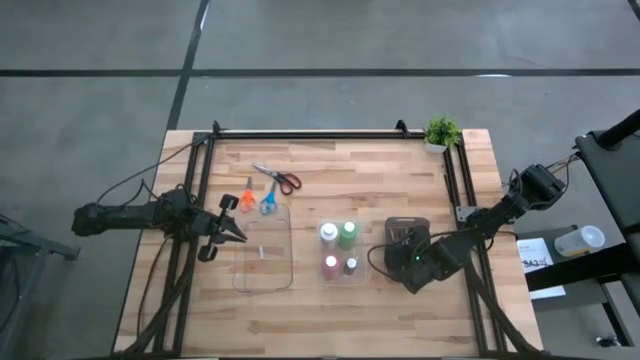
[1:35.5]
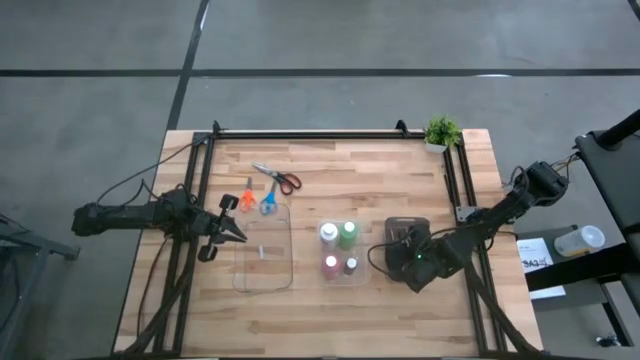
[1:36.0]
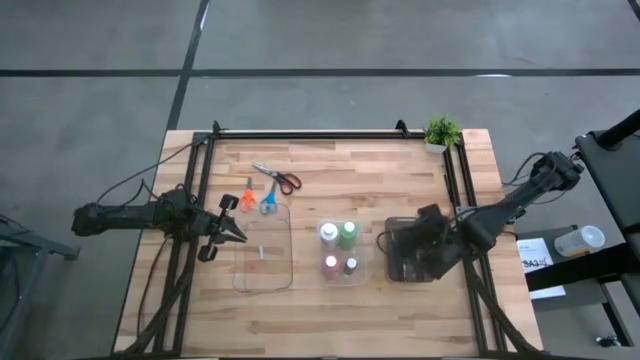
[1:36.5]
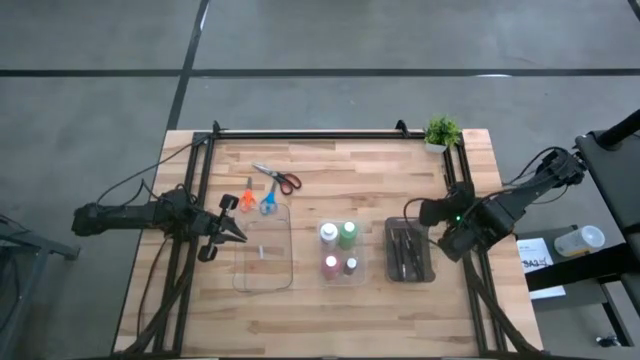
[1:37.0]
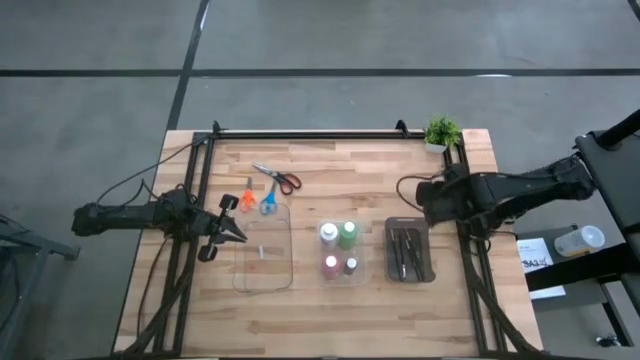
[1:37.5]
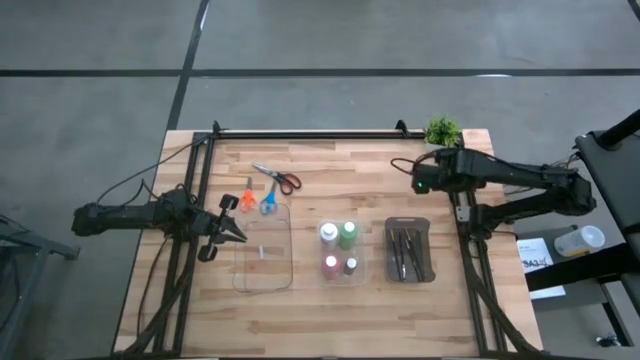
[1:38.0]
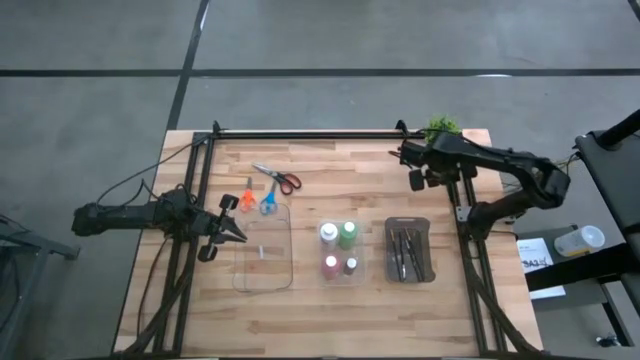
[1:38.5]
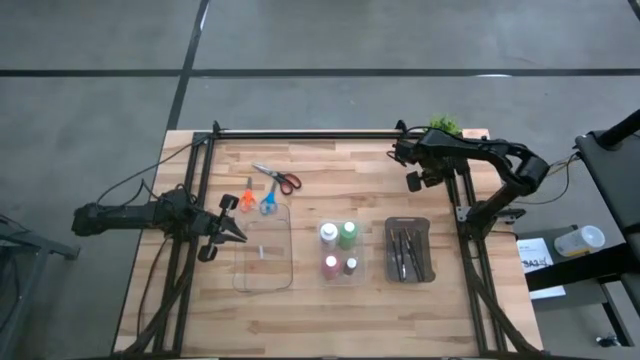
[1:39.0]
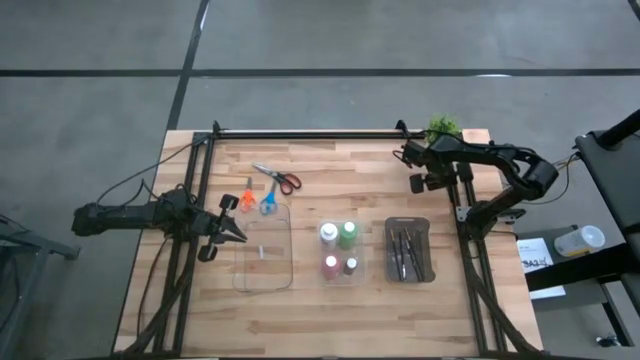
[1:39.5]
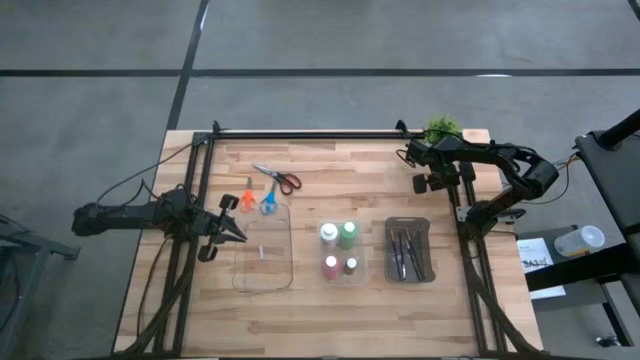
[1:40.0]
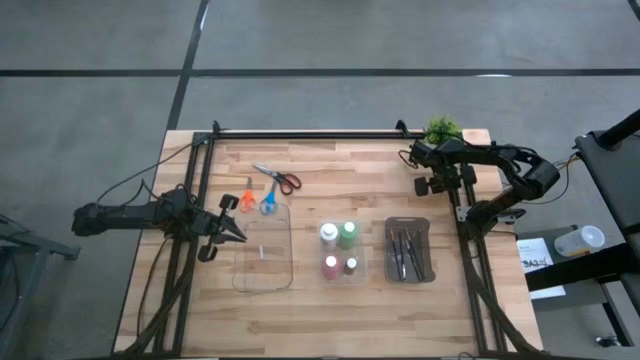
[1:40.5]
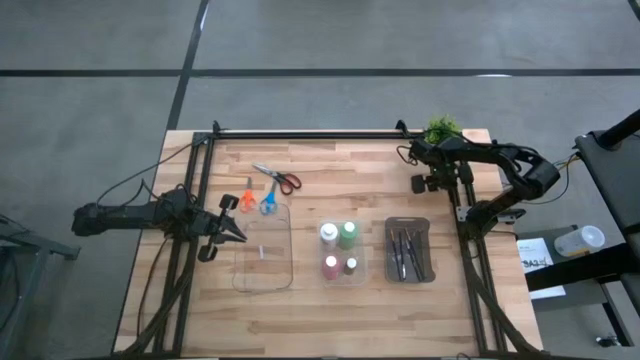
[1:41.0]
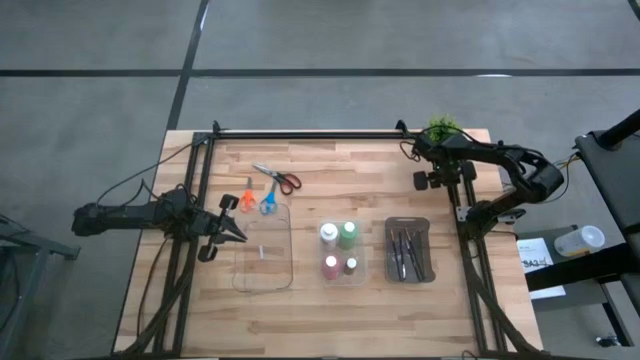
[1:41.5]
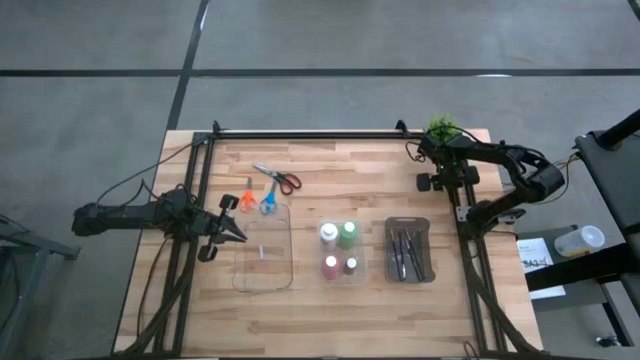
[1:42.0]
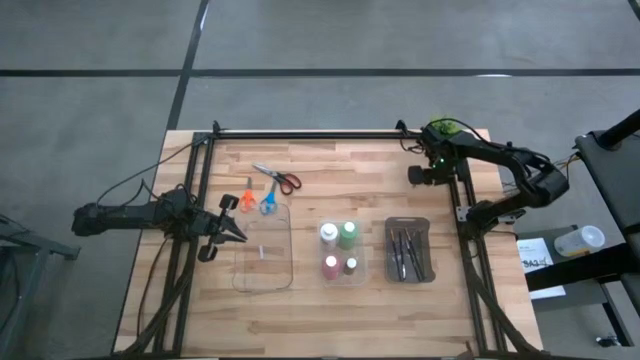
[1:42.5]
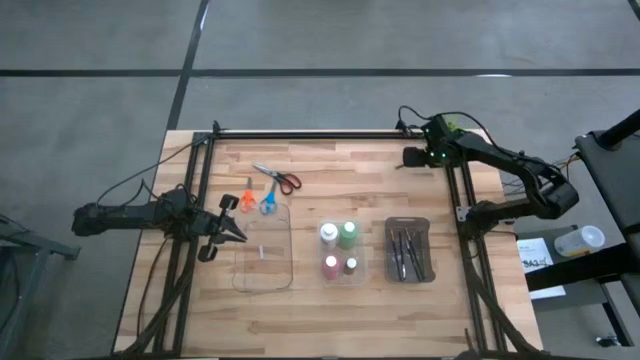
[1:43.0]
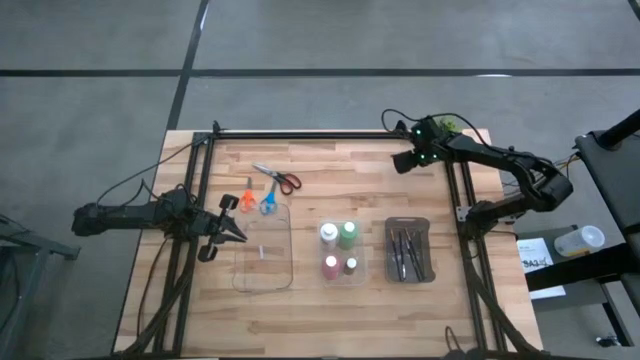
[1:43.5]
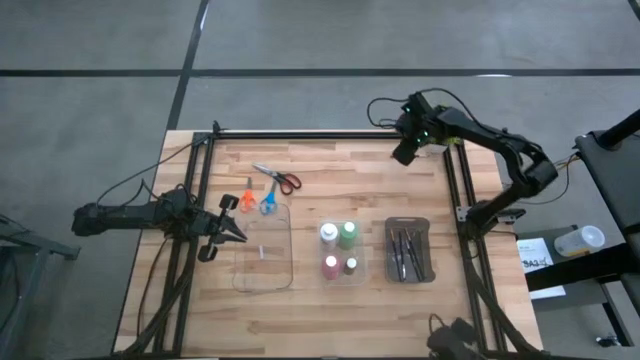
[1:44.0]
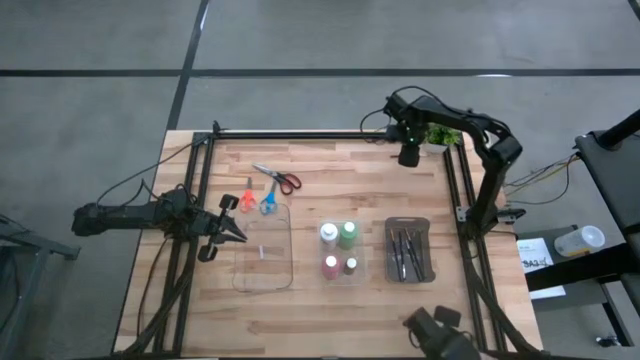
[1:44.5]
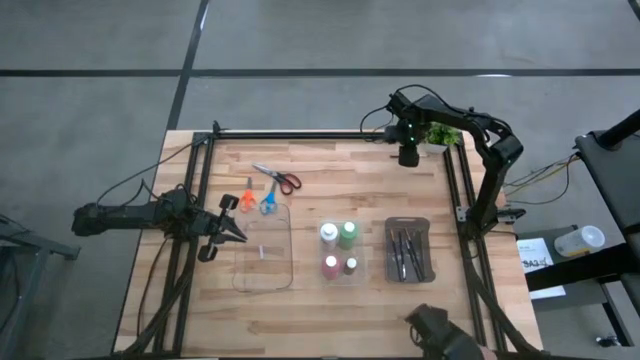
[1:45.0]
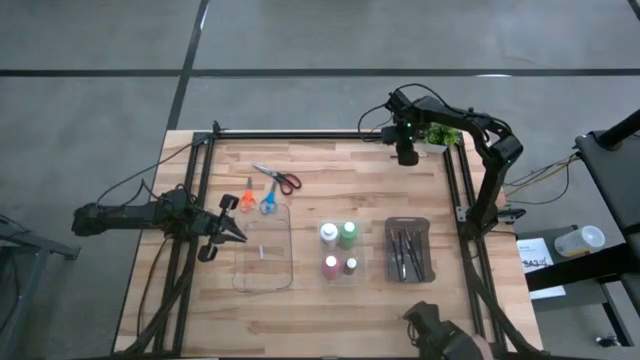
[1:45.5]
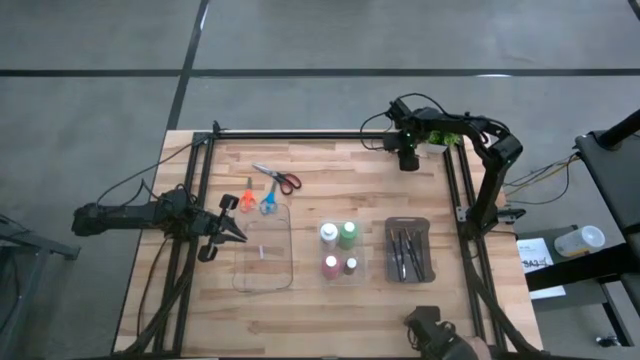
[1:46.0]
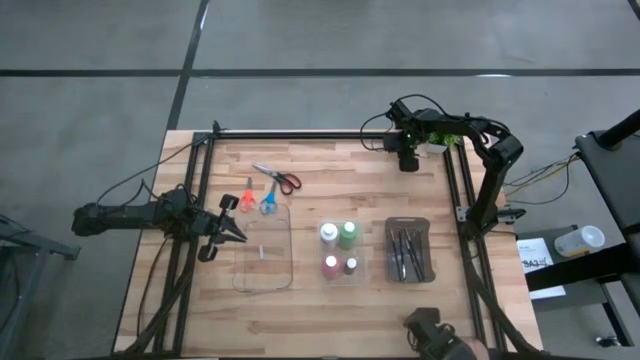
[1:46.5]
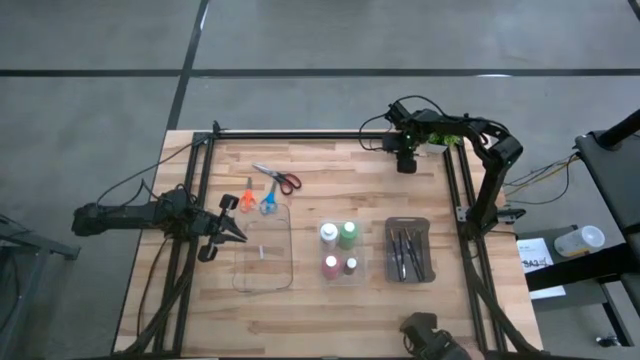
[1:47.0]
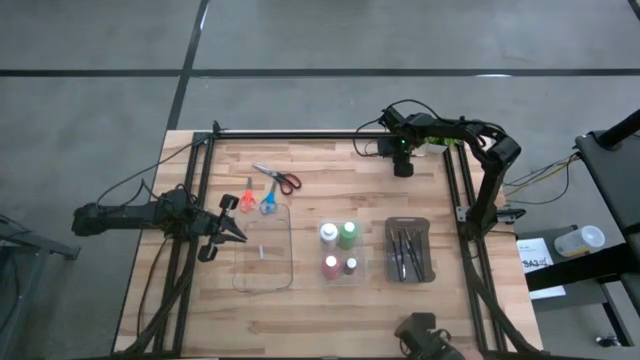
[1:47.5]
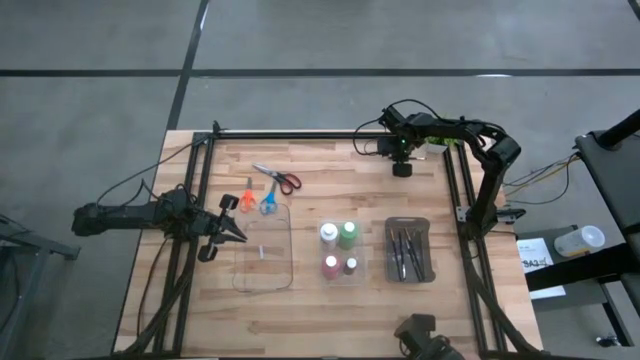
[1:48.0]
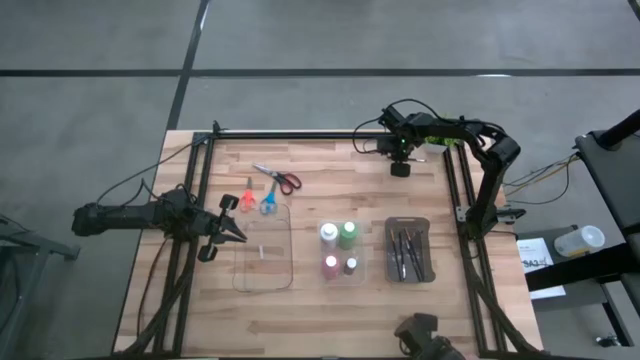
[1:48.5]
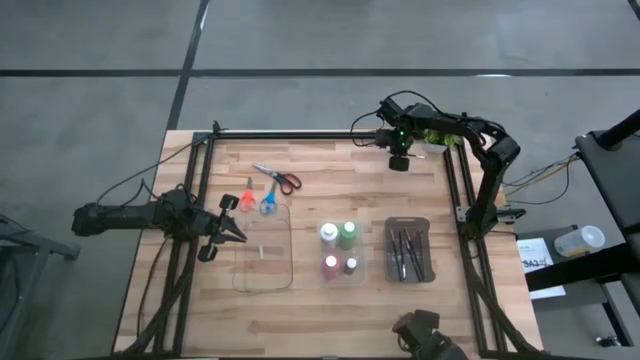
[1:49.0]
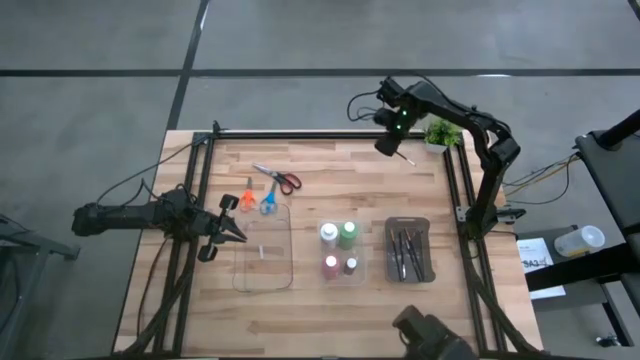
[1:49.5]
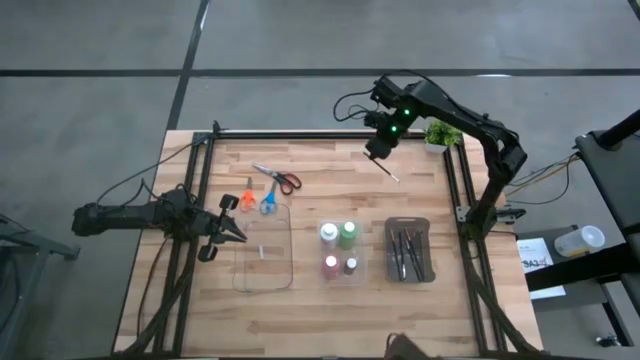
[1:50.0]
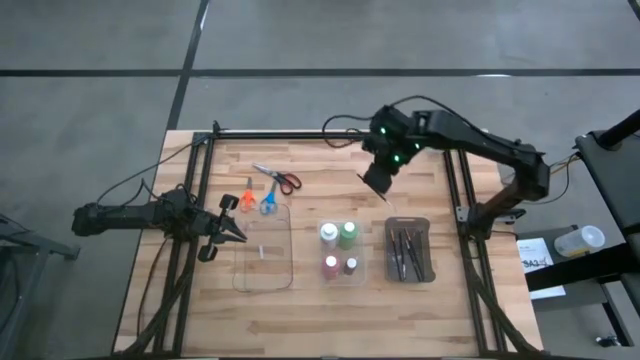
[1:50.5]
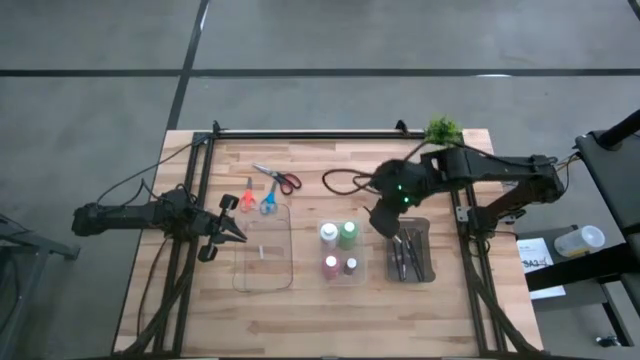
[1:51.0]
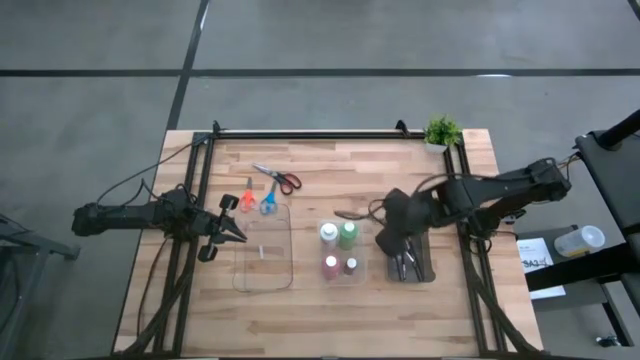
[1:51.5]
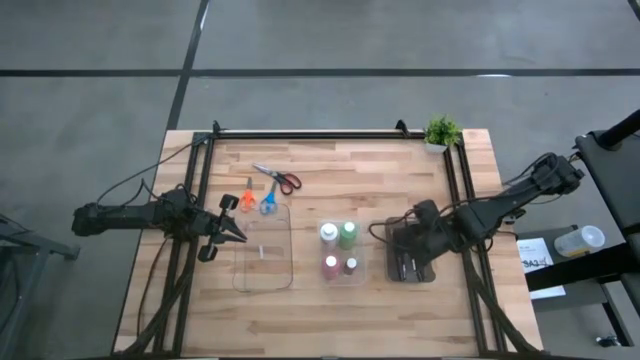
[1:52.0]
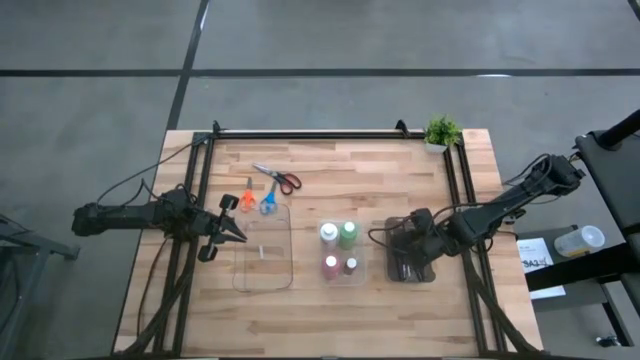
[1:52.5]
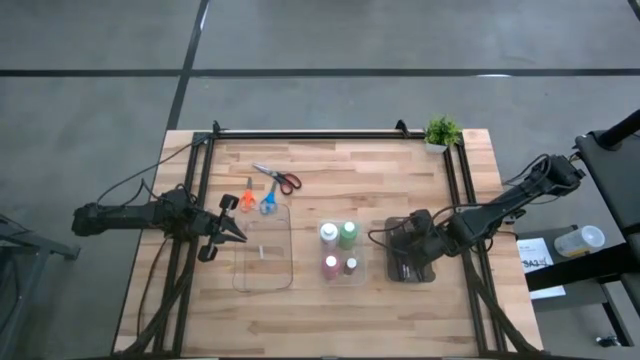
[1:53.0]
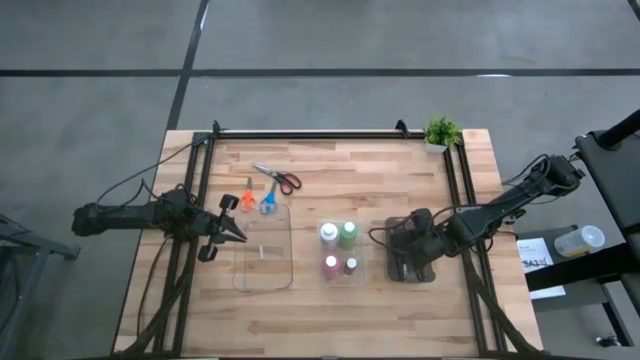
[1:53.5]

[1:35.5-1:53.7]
Task: Pick & Place Paint Supplies
Put the silver paintbrush into the black bin

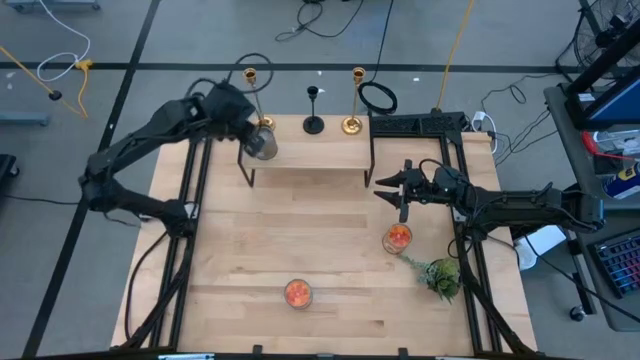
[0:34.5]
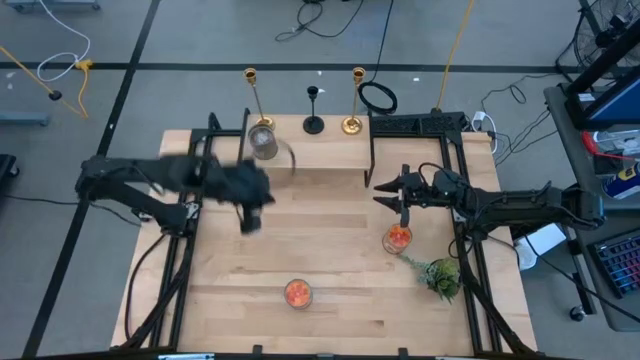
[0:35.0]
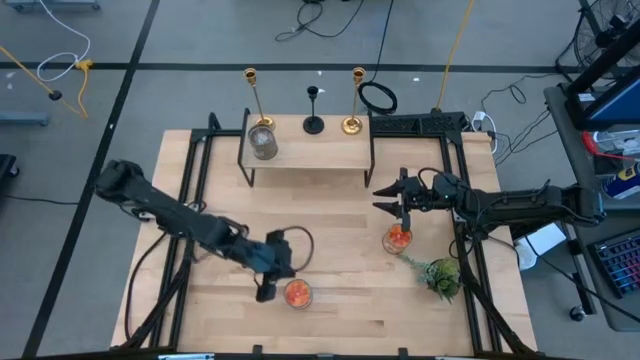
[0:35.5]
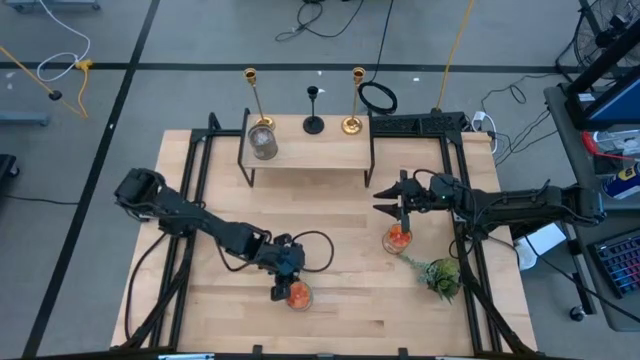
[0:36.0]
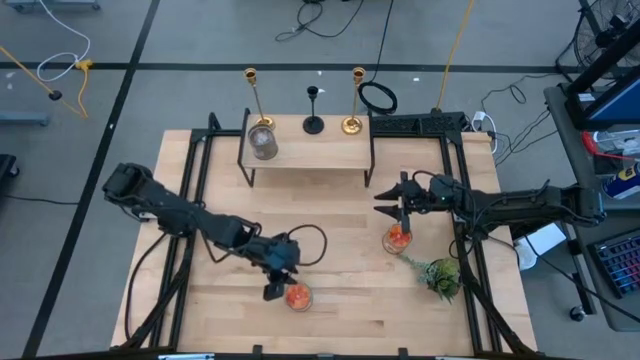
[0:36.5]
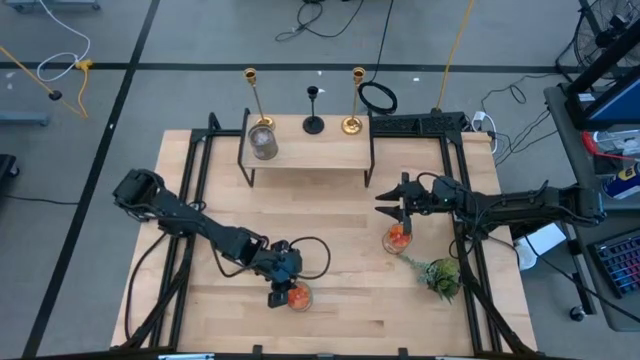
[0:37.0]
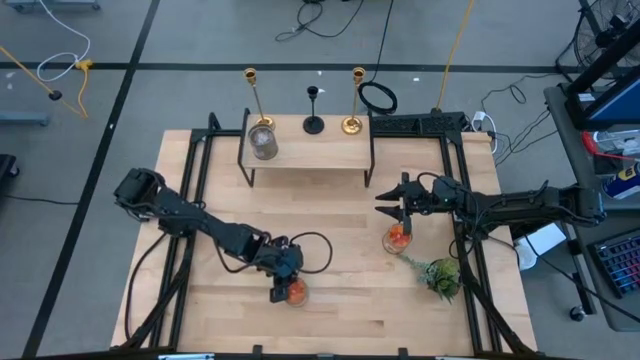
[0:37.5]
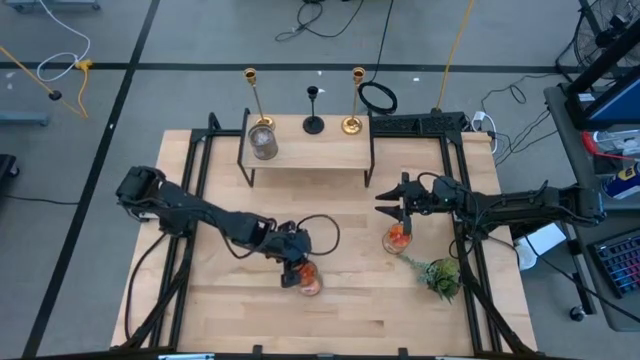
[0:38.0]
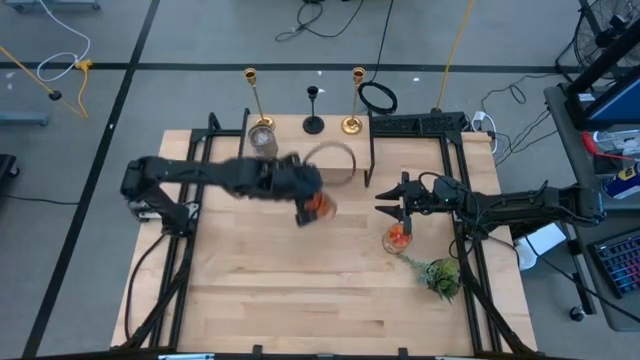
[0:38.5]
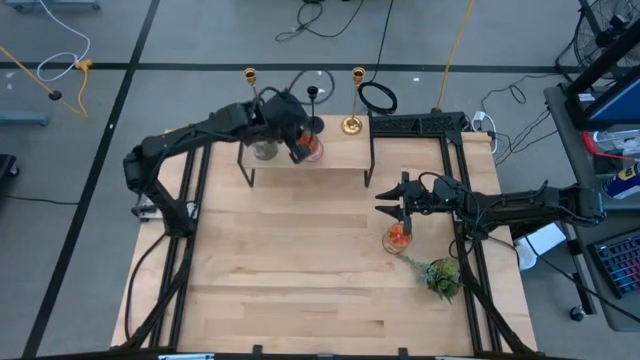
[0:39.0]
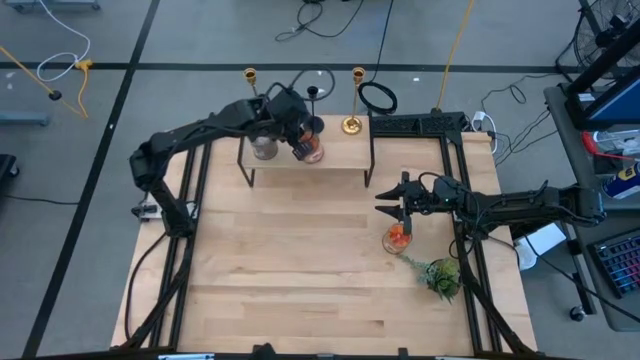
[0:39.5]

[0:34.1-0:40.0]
Task: Pick & Place candle stick holders
Put the bottom orange candle on the shelf
